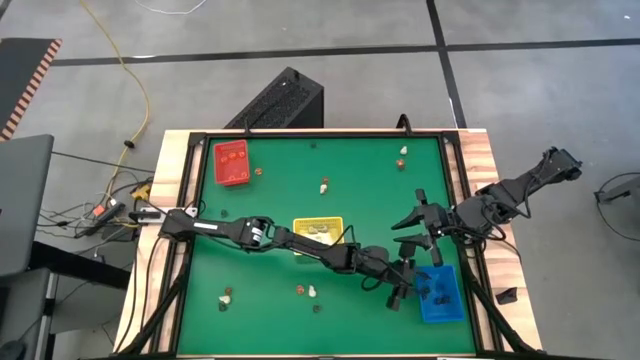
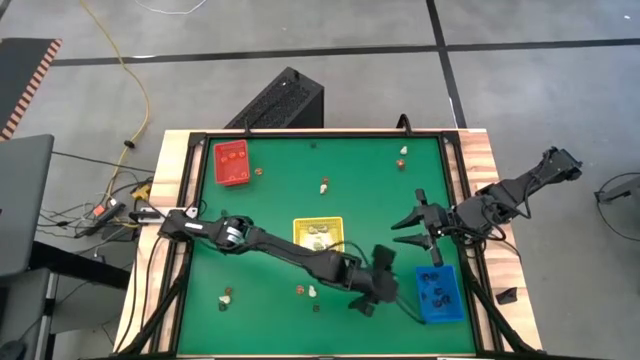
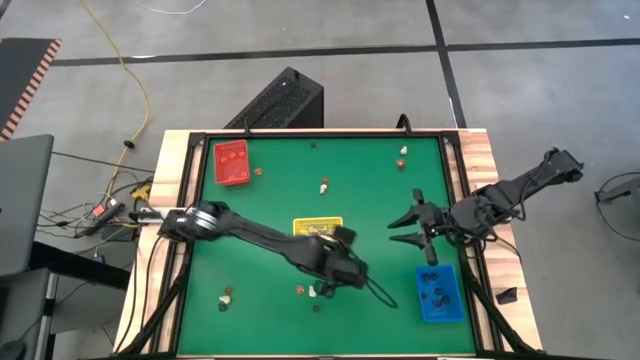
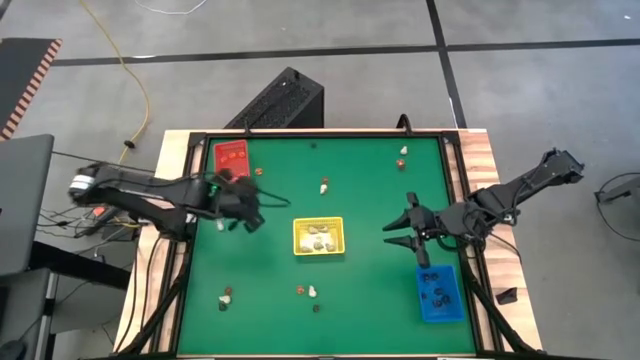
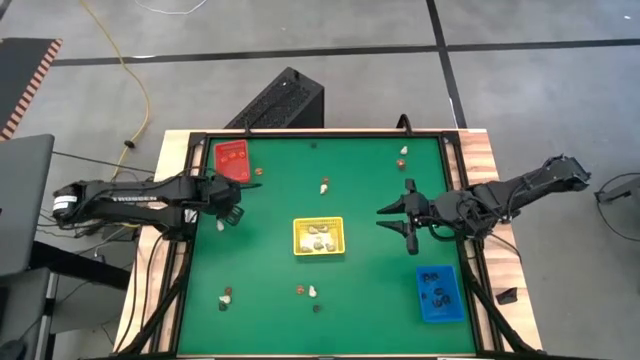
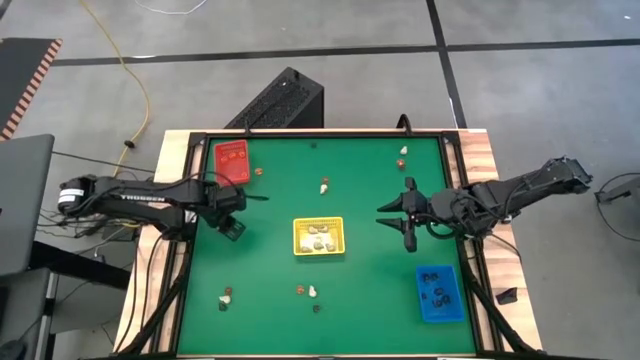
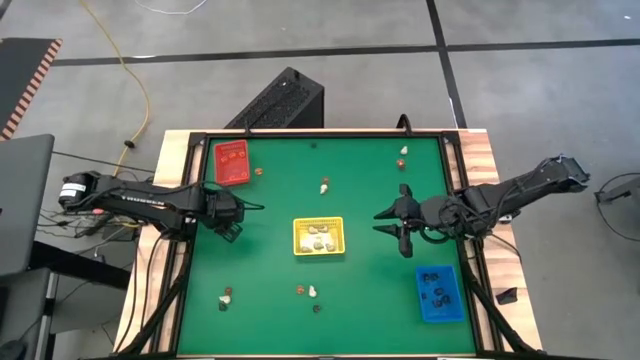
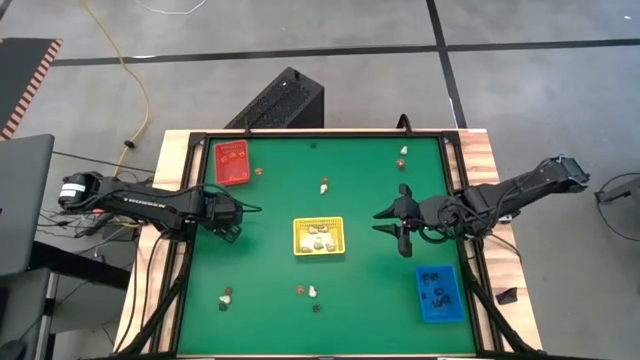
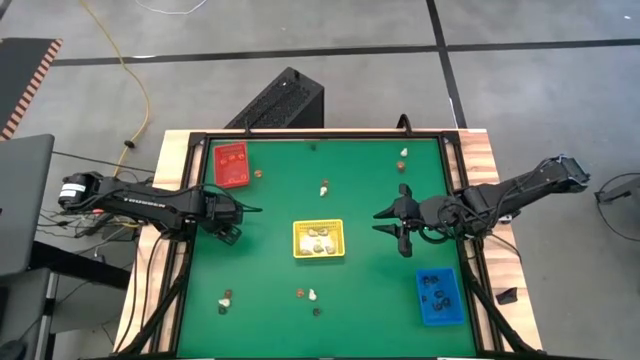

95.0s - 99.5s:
Task: Sort Halloween decoration
Put the white skull toy into the yellow bin

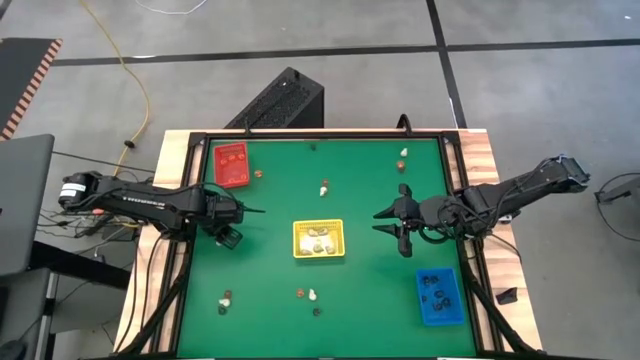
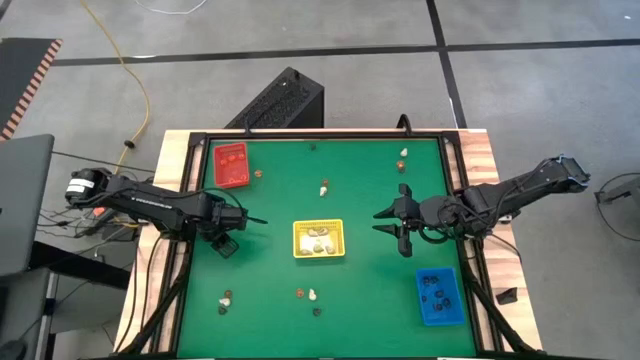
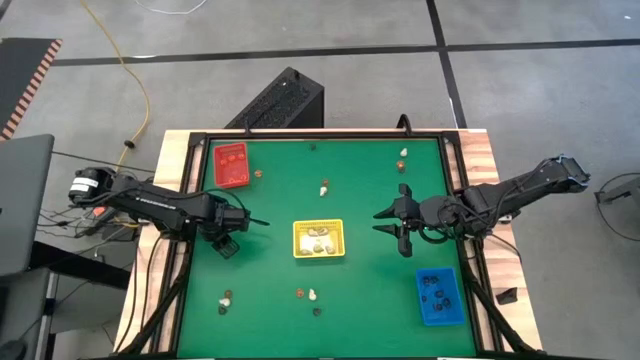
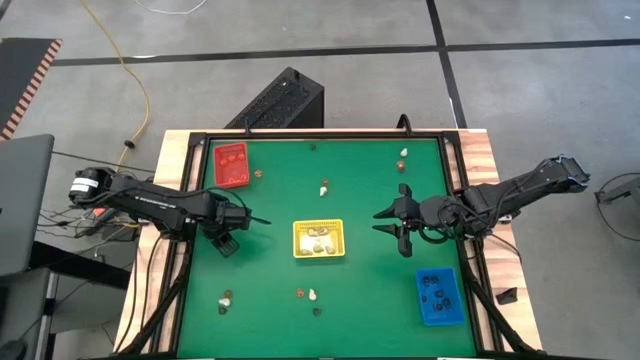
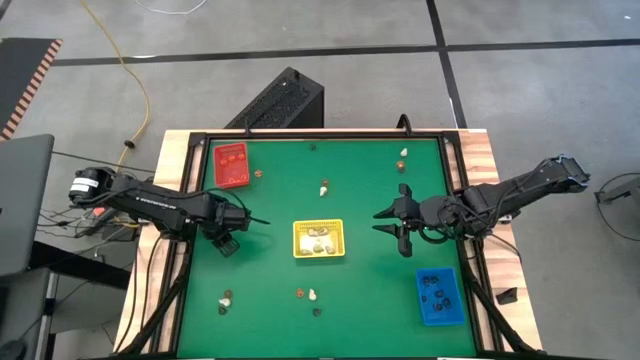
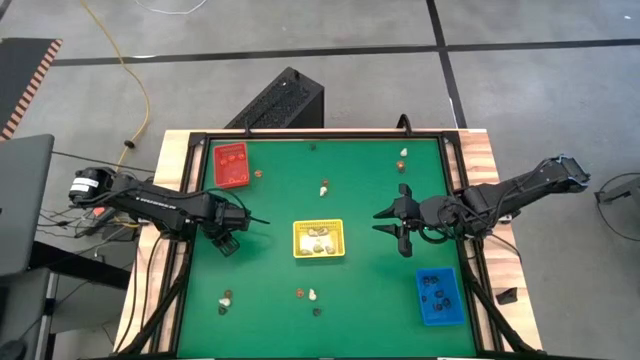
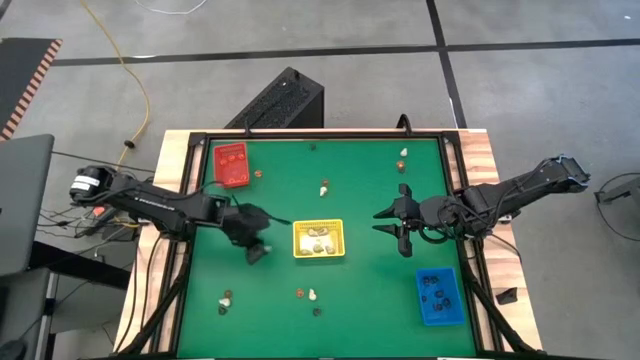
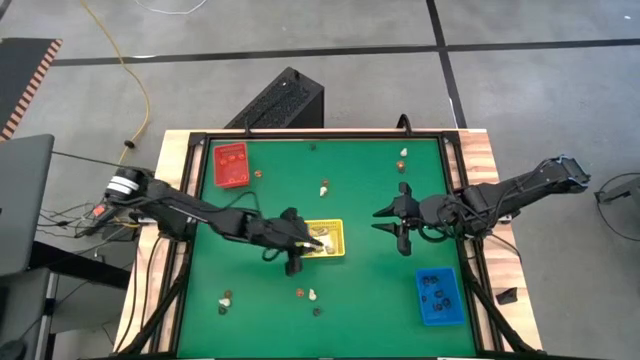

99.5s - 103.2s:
Put the white skull toy into the yellow bin

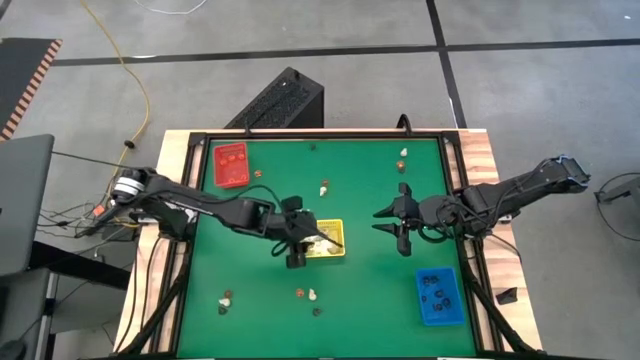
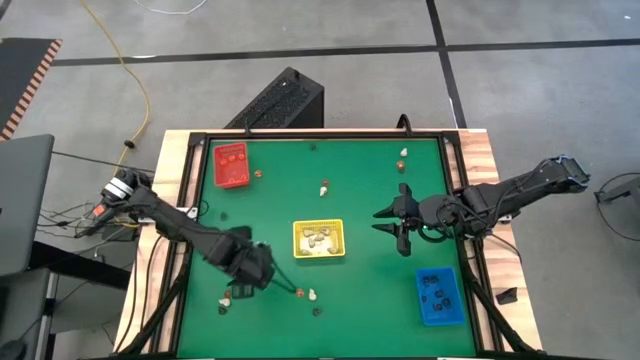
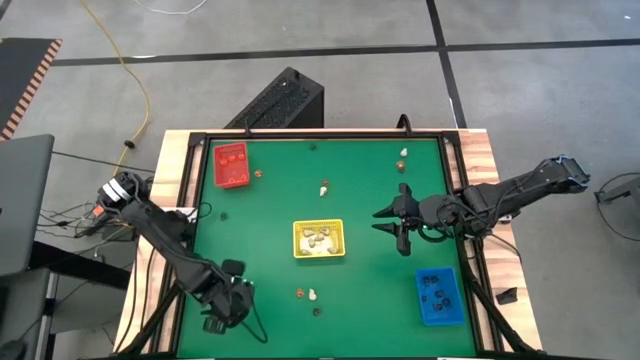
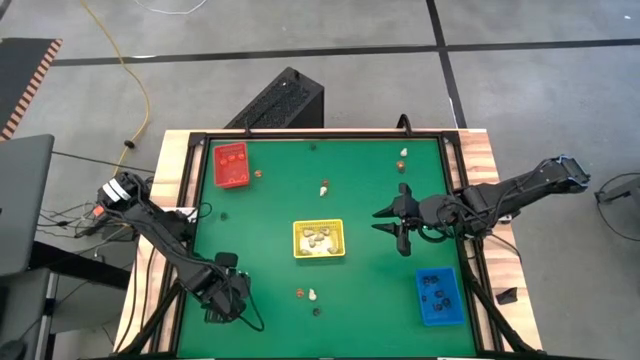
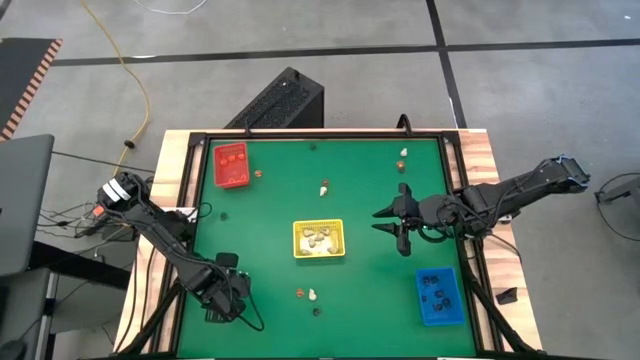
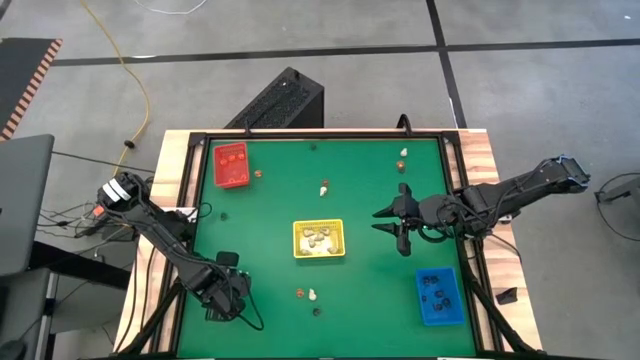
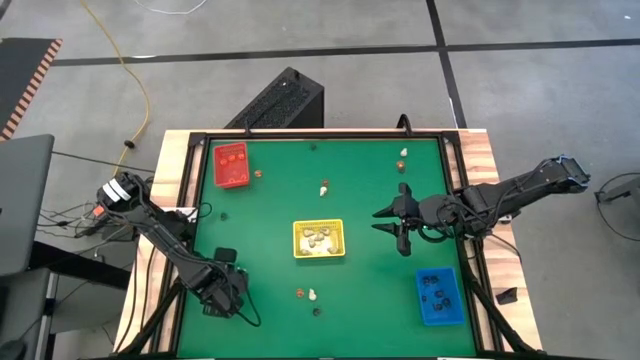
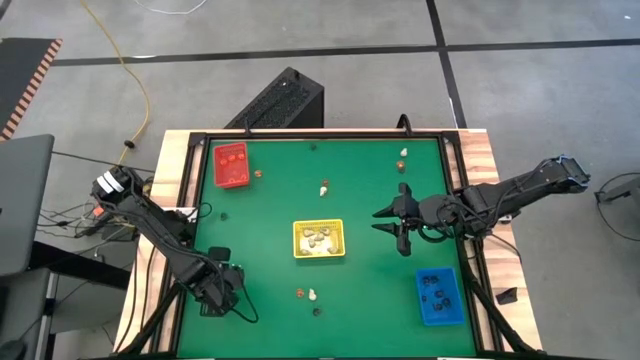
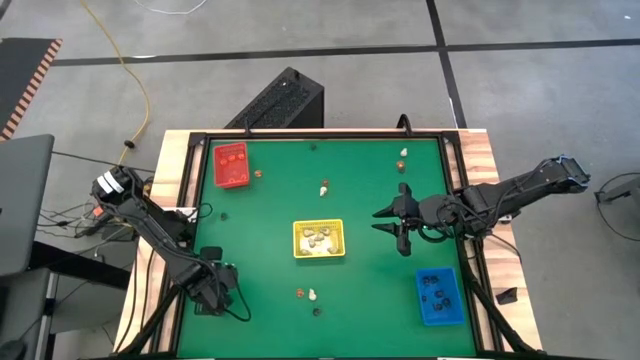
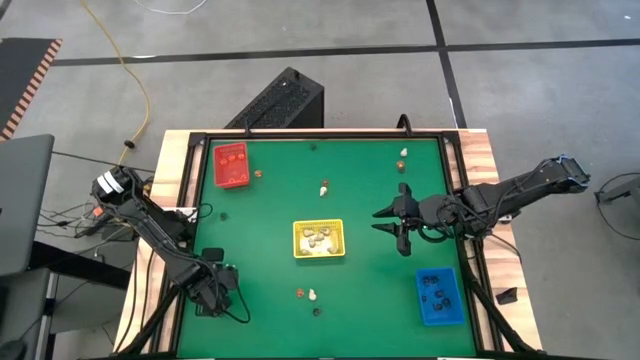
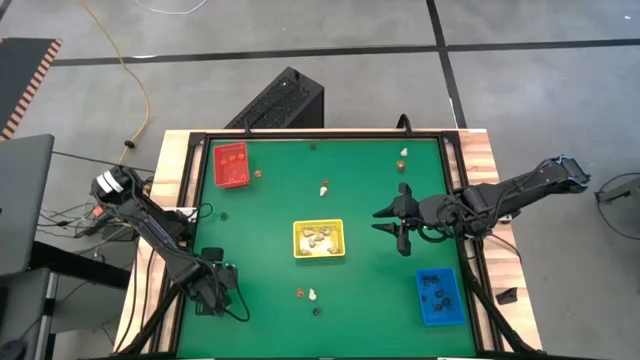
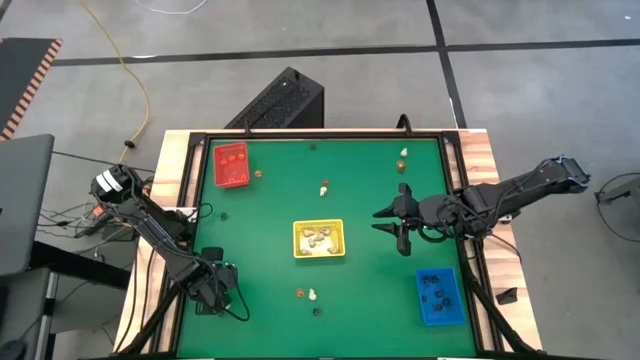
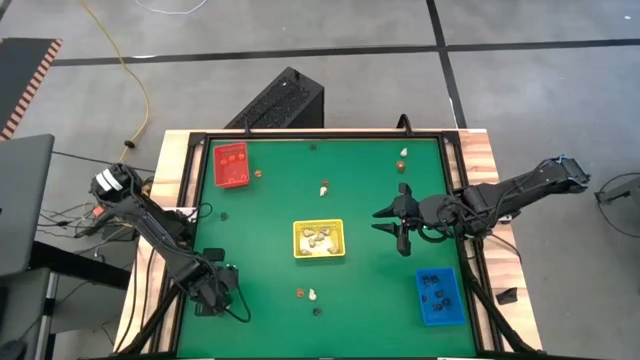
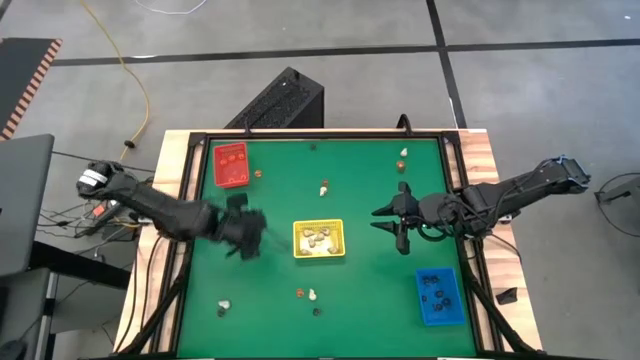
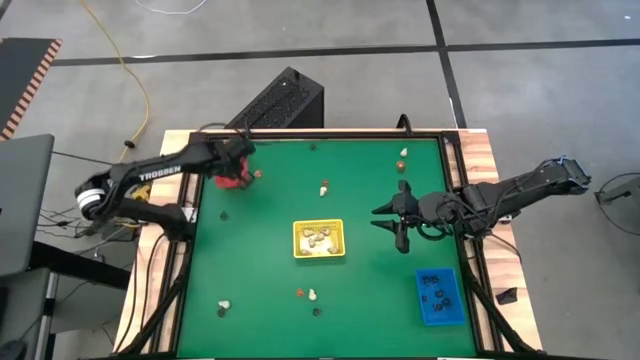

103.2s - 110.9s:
Put the orange pumpkin toy into the red bin

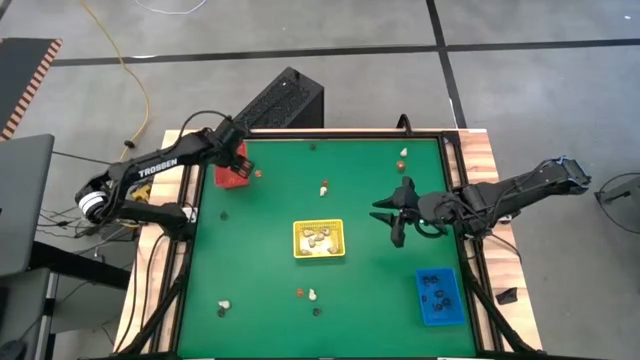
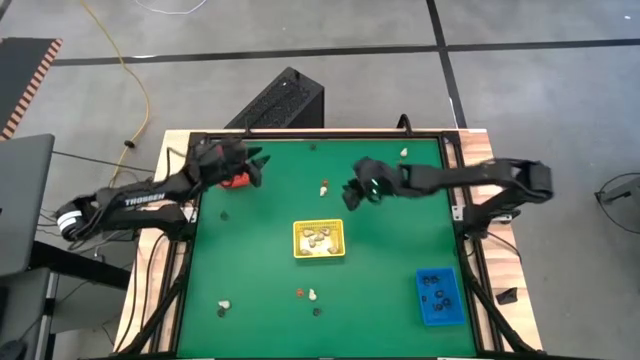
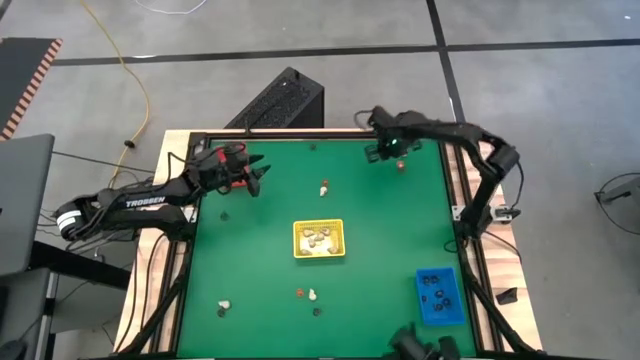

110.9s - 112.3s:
Put the white skull toy into the yellow bin

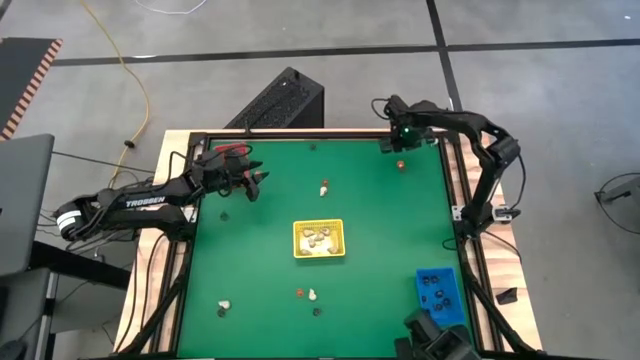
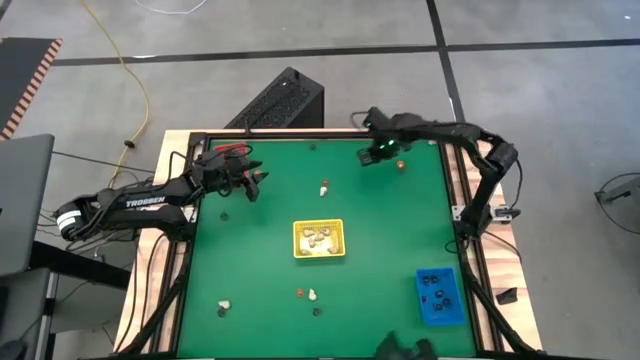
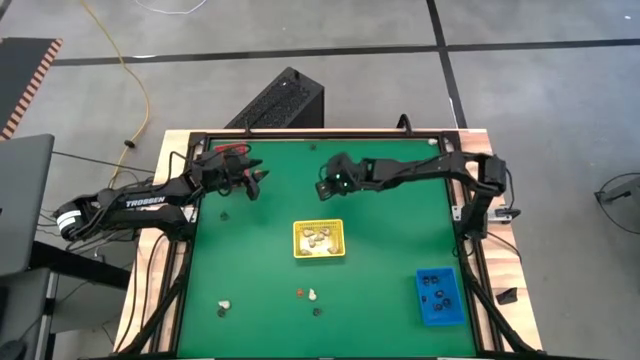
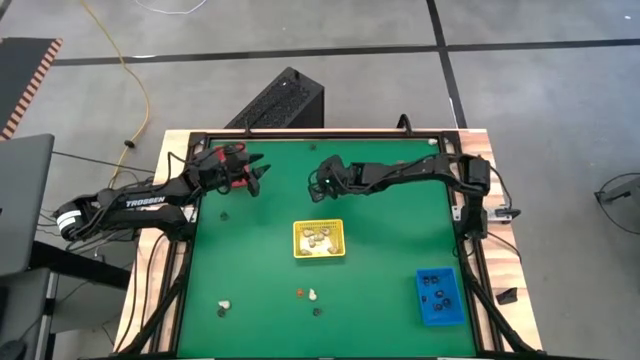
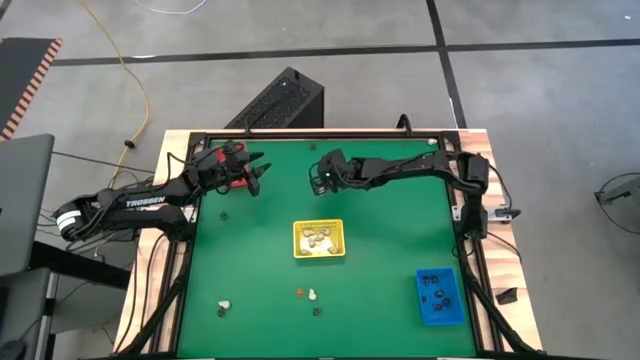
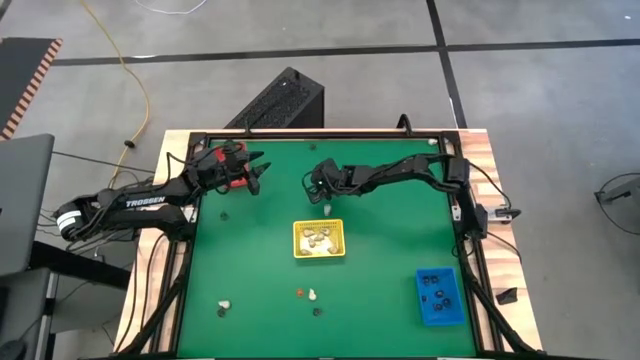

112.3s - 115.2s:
Put the orange pumpkin toy into the red bin
